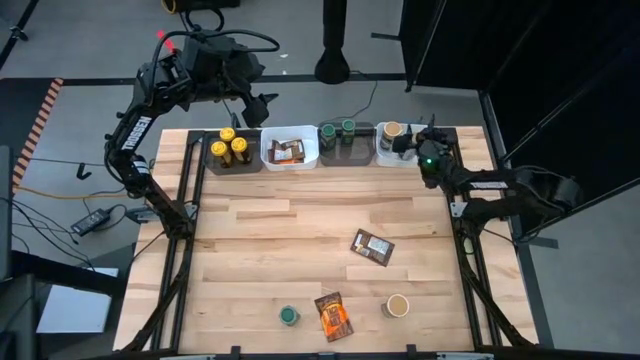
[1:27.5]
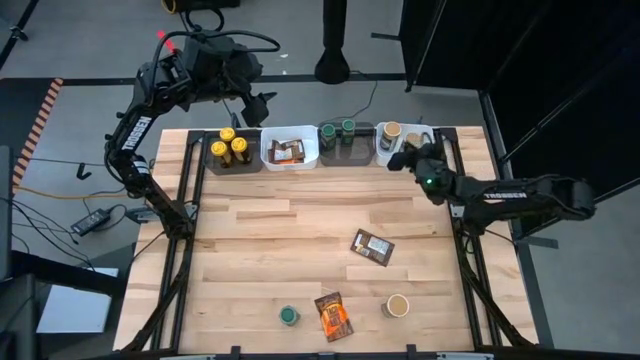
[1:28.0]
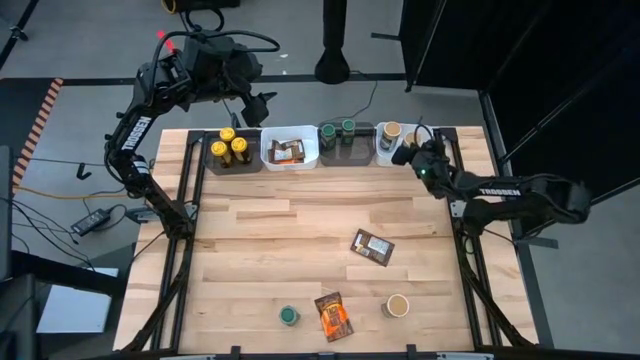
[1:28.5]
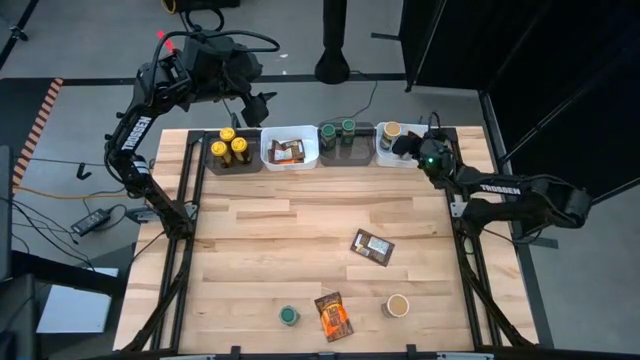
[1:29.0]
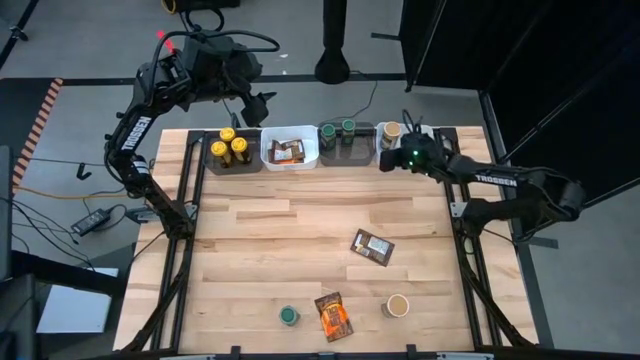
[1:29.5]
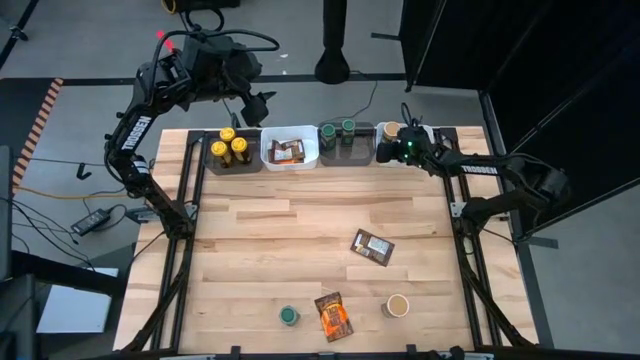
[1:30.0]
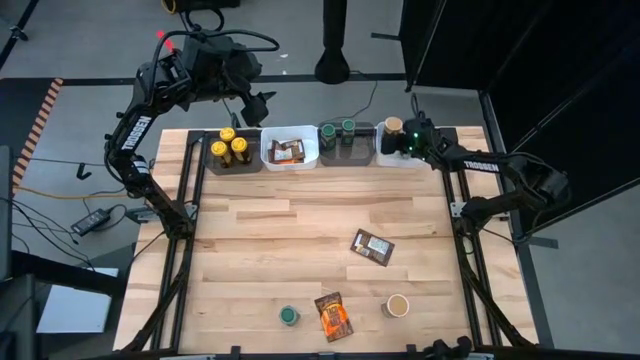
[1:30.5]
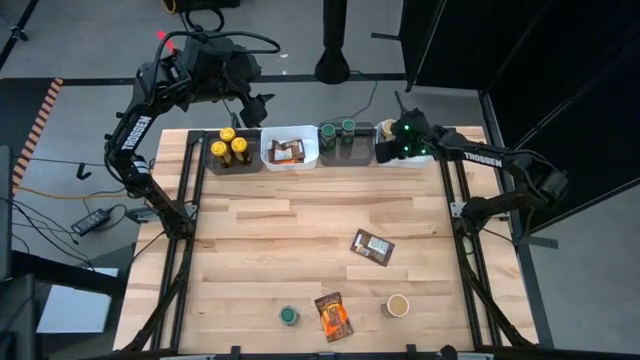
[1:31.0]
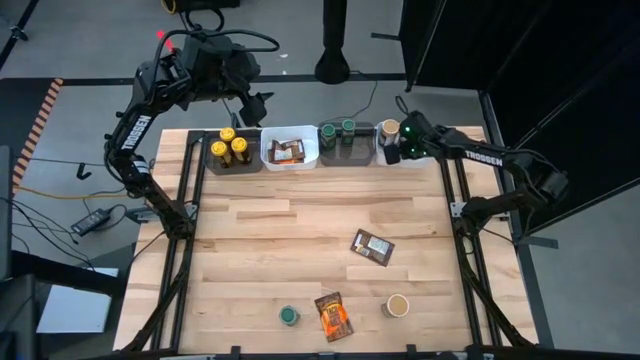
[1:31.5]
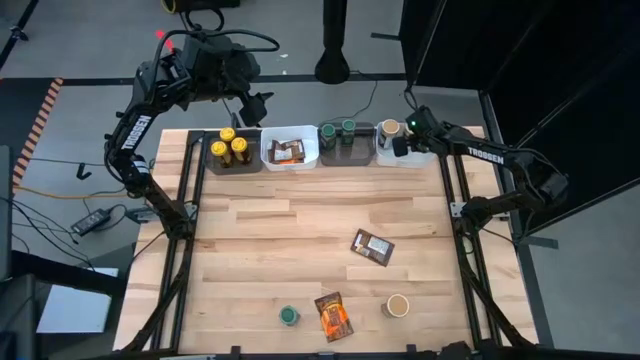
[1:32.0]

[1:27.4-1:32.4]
Task: Sort spices by type
Adjust the brown seasoning bottles in the right white bin

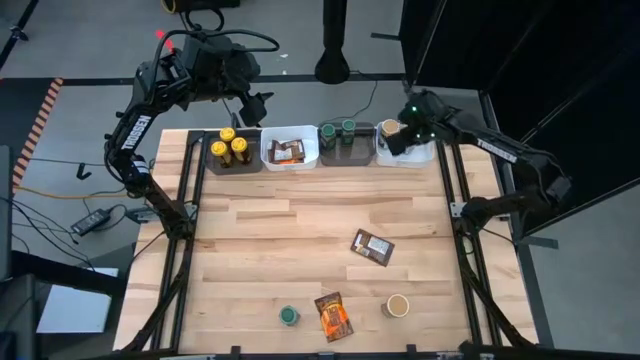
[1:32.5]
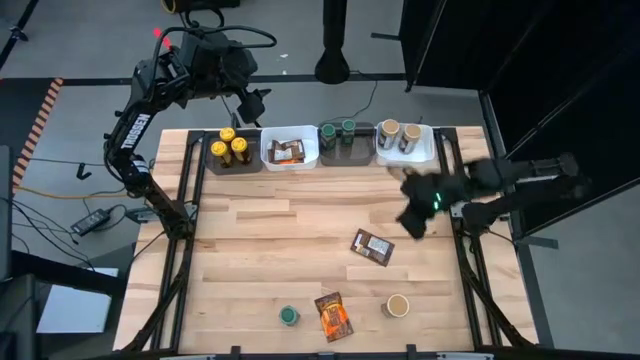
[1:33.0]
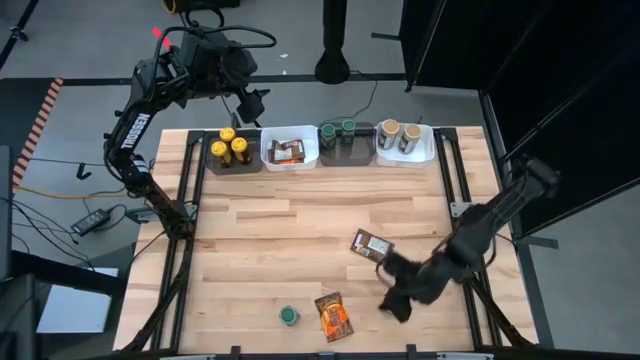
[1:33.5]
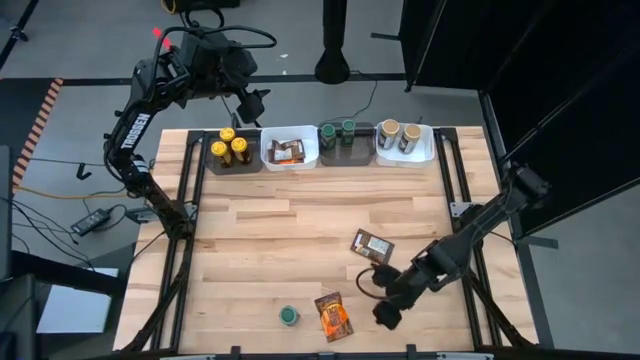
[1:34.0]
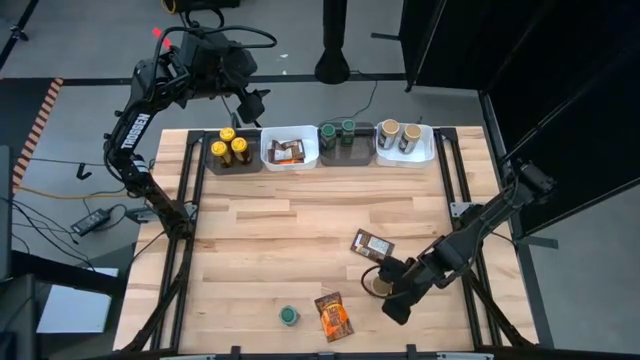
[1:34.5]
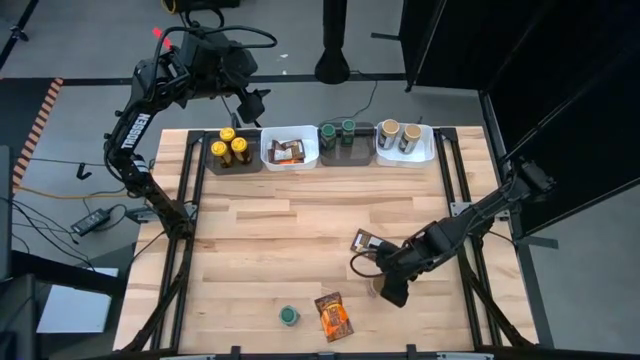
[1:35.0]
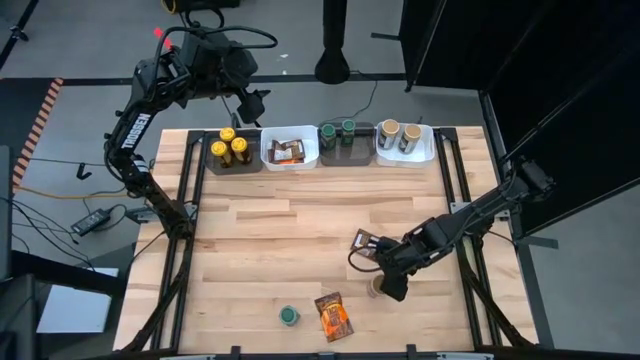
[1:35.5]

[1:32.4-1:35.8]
Put the brown seasoning bottle into the right white bin

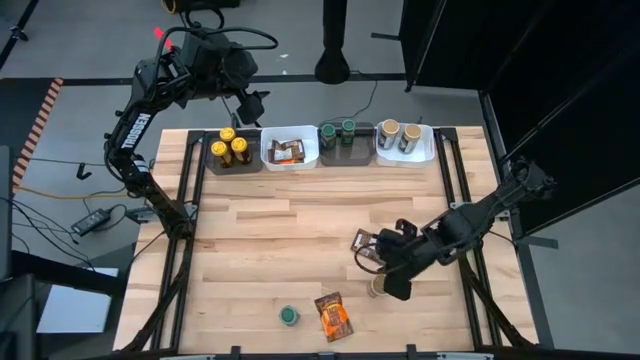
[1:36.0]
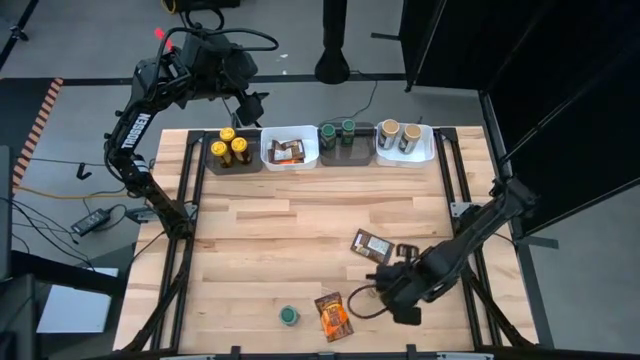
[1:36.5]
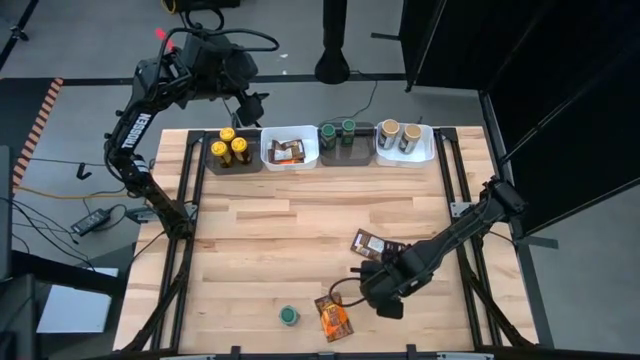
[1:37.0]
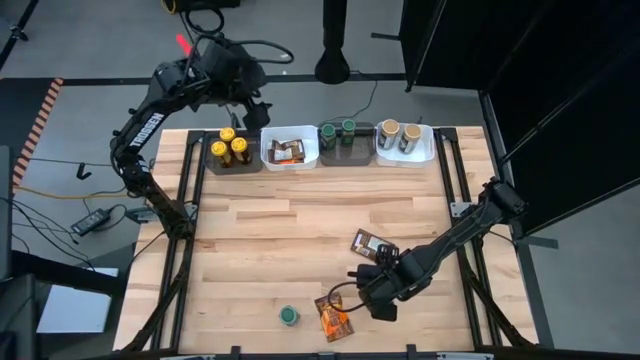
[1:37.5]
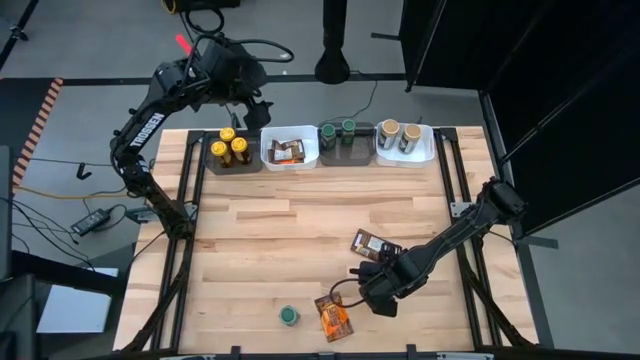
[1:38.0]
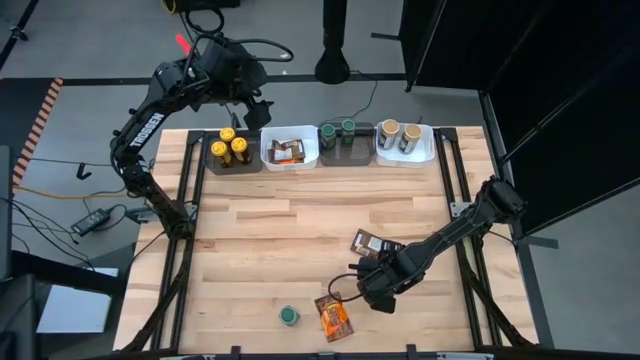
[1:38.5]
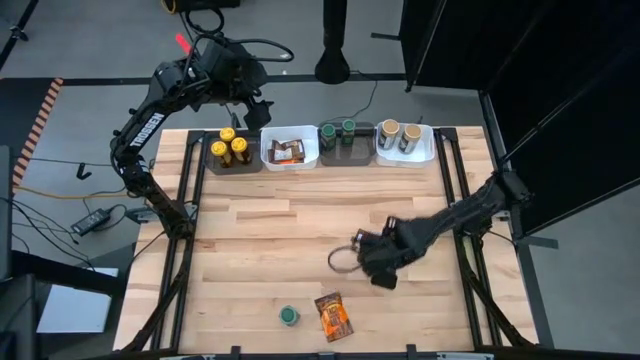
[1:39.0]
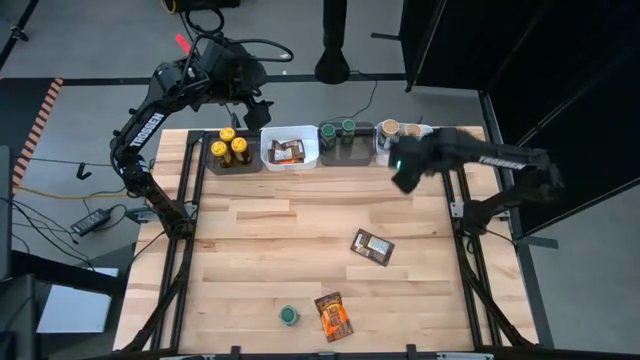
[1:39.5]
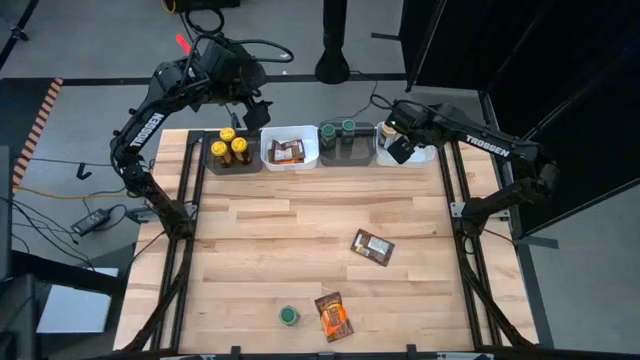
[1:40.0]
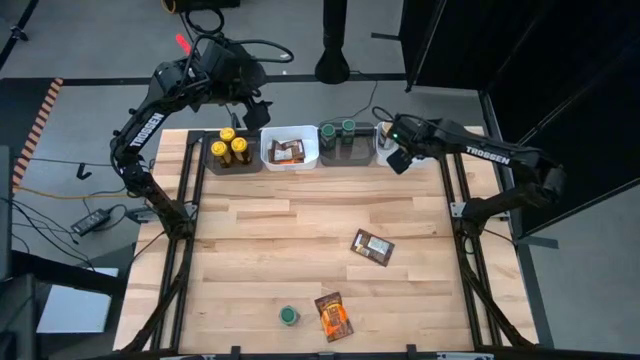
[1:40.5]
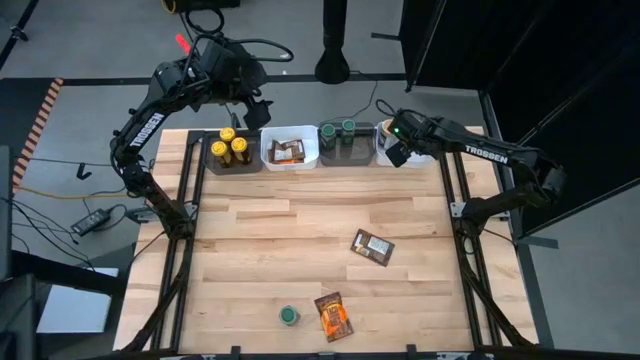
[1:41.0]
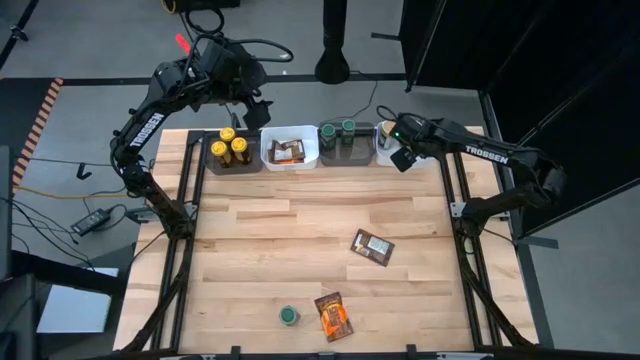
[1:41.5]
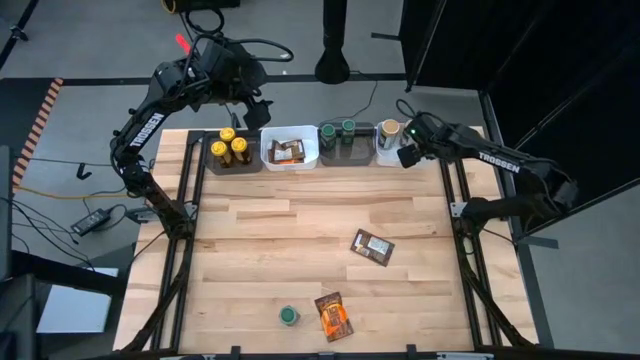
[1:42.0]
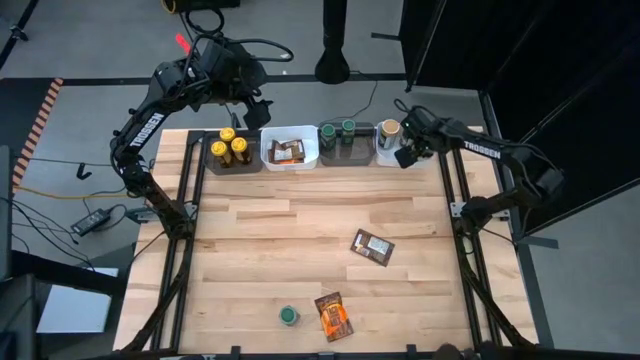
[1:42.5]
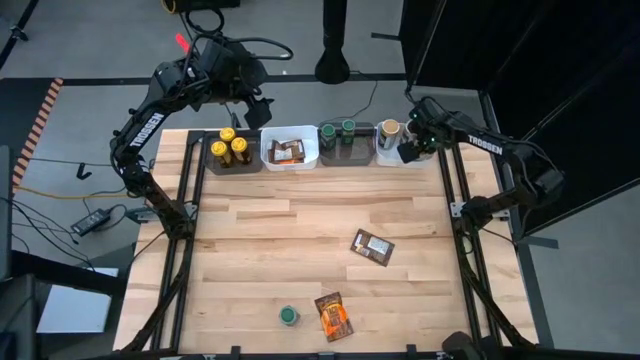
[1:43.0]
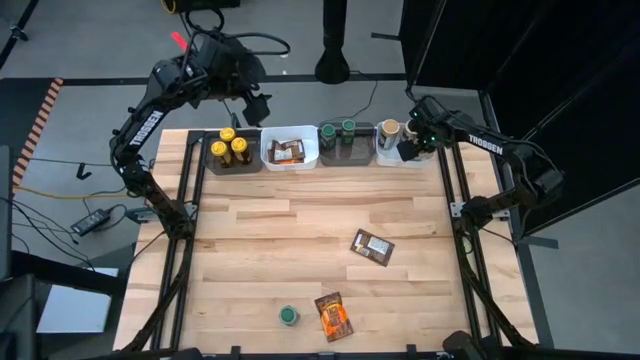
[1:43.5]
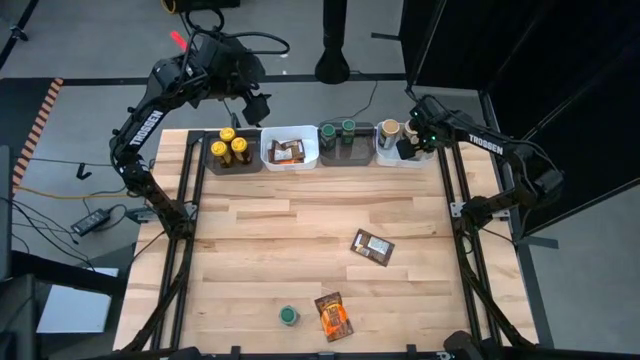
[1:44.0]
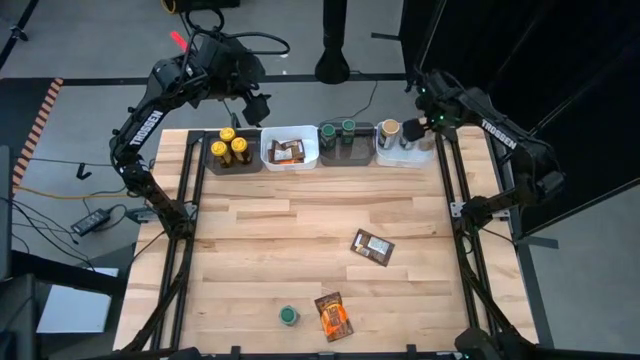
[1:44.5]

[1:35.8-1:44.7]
Put the brown seasoning bottle into the right white bin

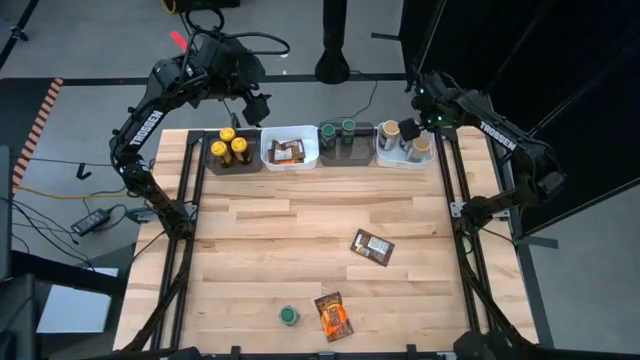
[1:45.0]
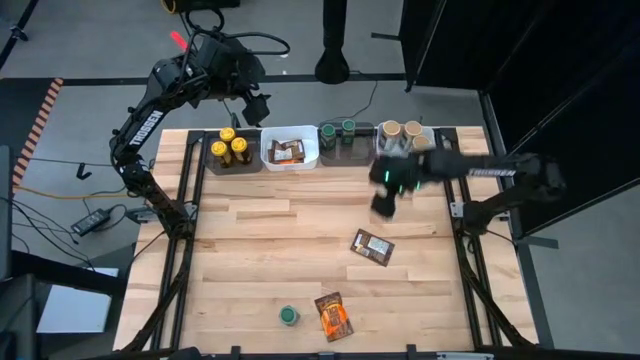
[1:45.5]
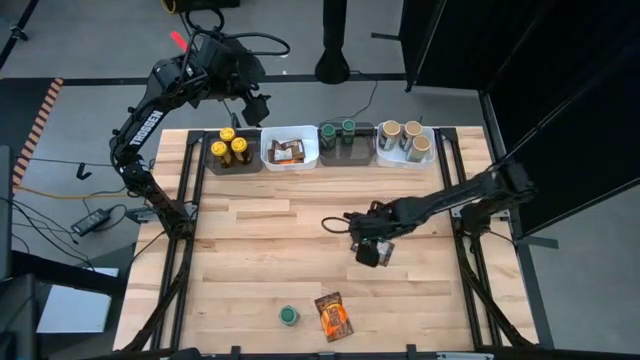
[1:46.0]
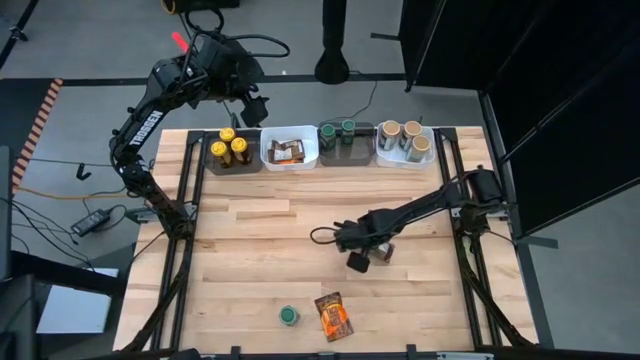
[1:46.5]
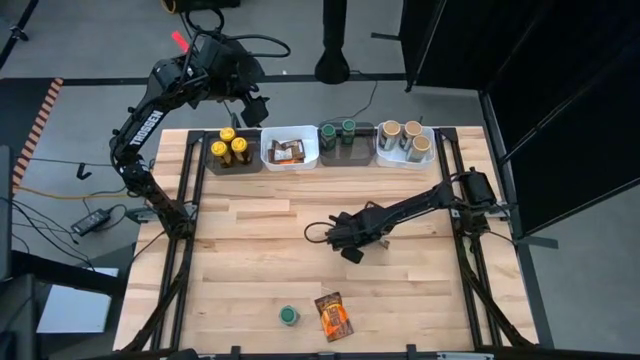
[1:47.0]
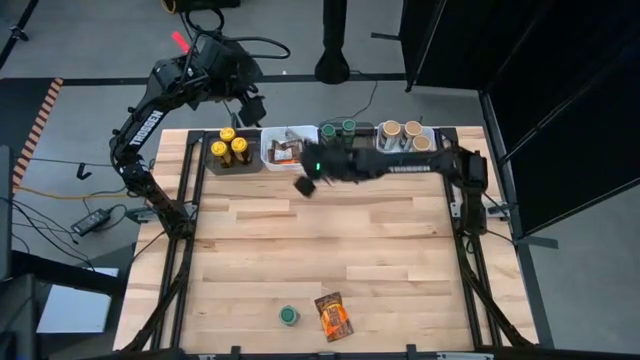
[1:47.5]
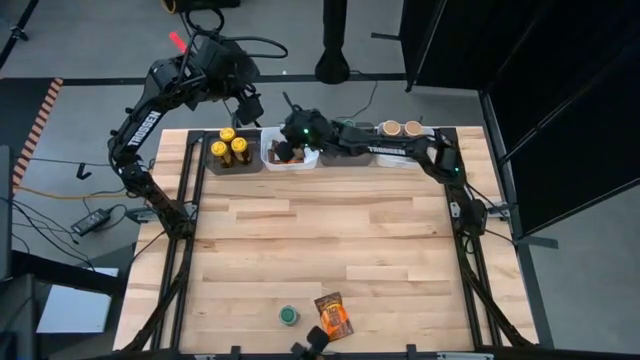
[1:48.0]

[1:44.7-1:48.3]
Put the top orange seasoning pack into the left white bin
